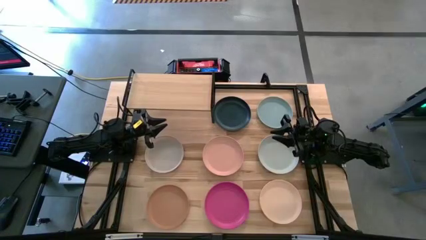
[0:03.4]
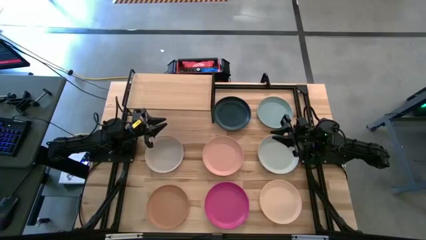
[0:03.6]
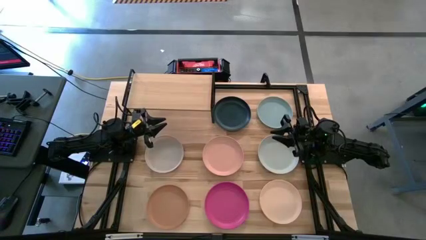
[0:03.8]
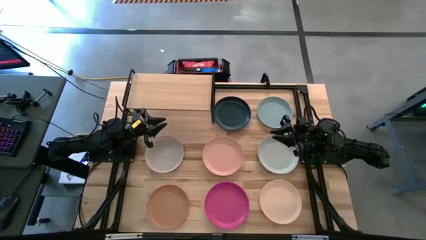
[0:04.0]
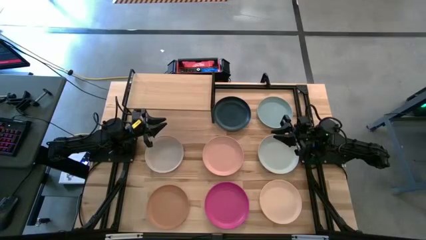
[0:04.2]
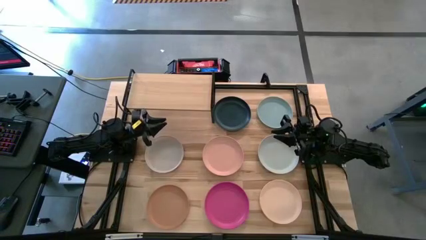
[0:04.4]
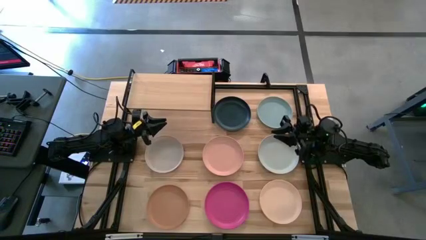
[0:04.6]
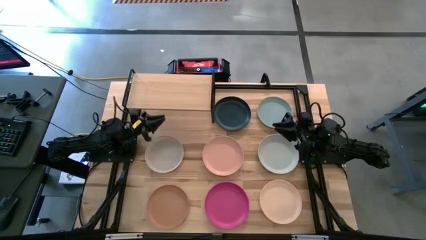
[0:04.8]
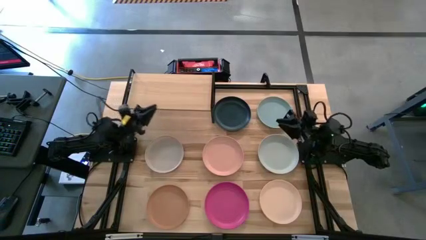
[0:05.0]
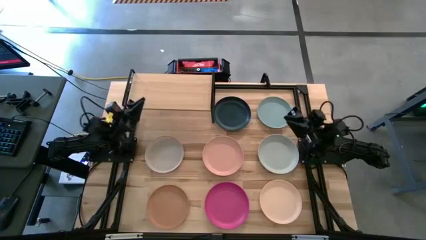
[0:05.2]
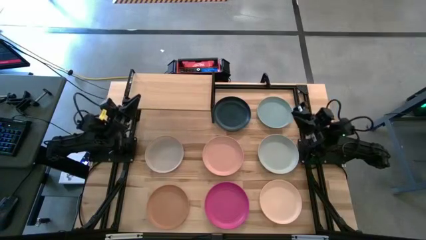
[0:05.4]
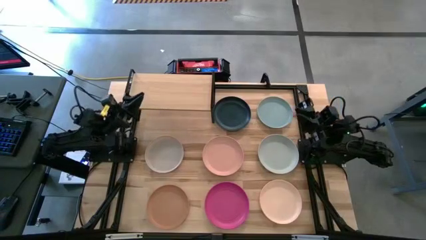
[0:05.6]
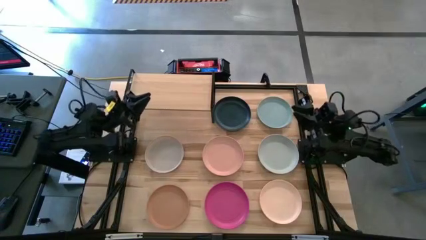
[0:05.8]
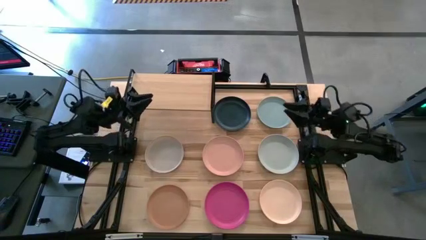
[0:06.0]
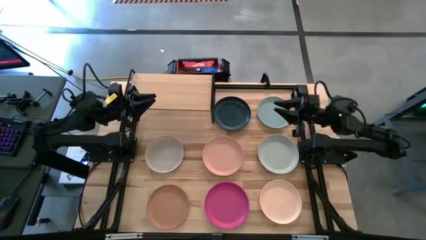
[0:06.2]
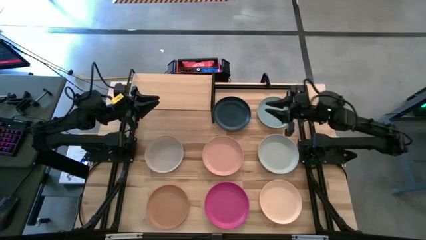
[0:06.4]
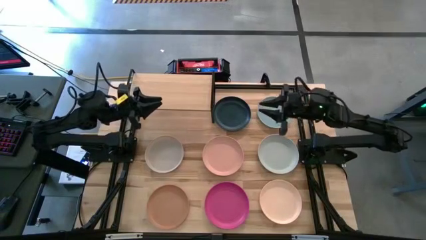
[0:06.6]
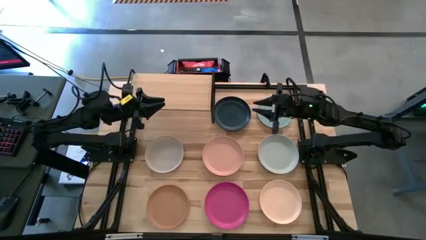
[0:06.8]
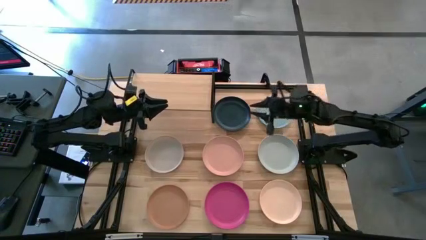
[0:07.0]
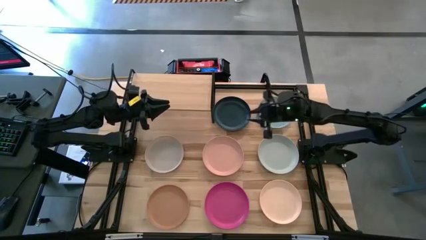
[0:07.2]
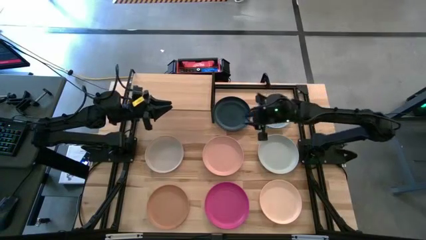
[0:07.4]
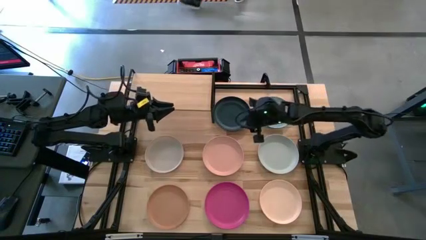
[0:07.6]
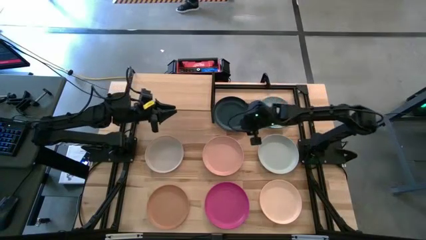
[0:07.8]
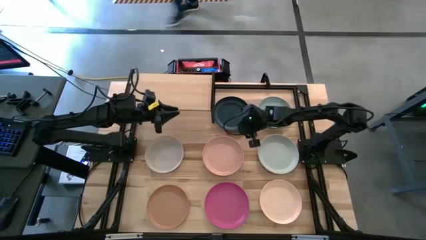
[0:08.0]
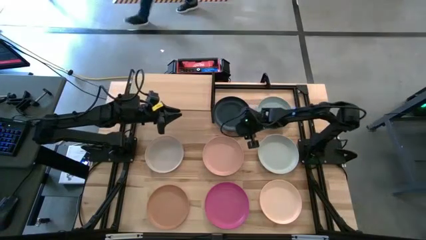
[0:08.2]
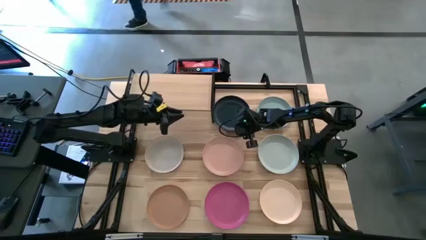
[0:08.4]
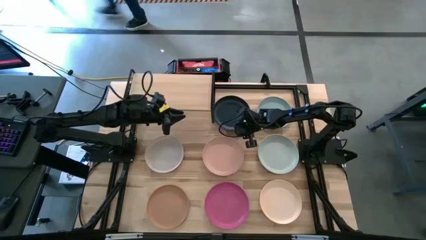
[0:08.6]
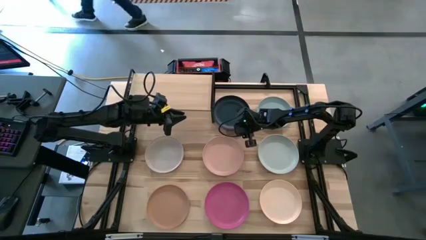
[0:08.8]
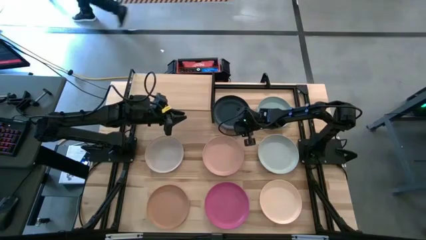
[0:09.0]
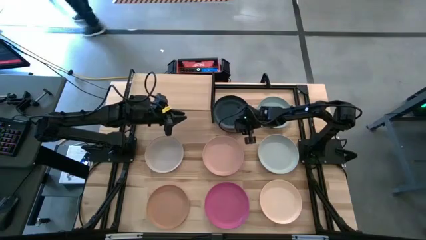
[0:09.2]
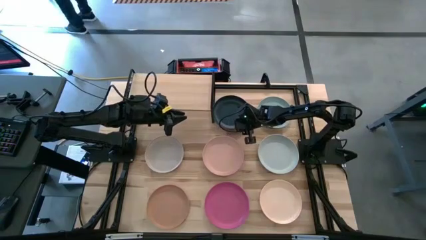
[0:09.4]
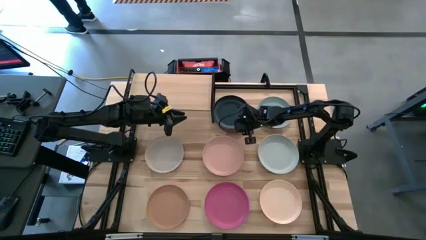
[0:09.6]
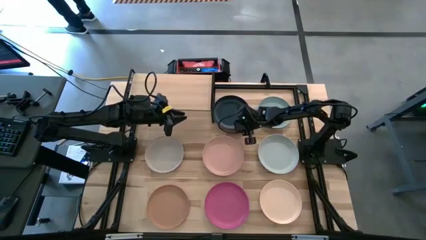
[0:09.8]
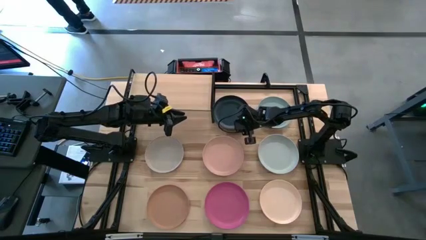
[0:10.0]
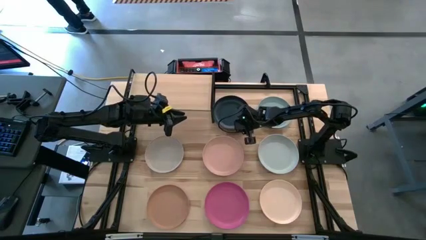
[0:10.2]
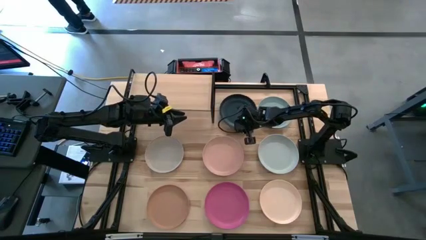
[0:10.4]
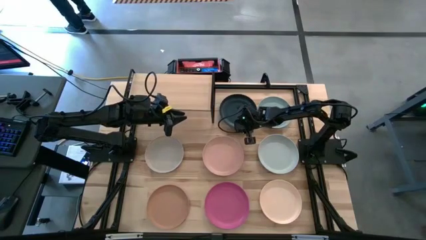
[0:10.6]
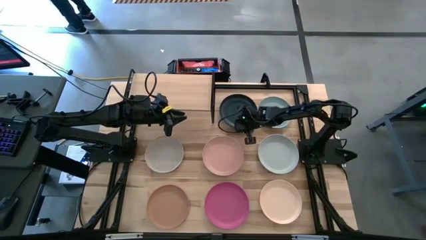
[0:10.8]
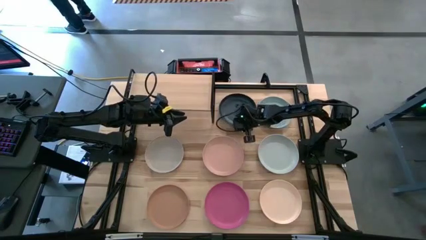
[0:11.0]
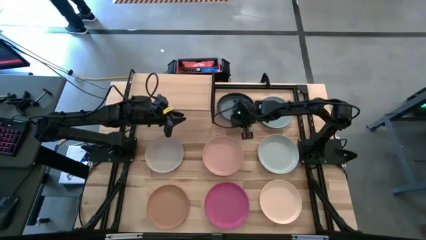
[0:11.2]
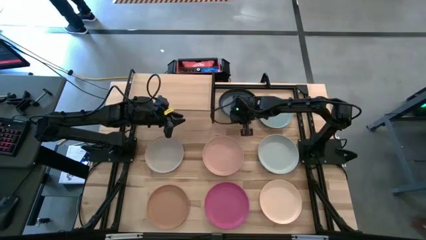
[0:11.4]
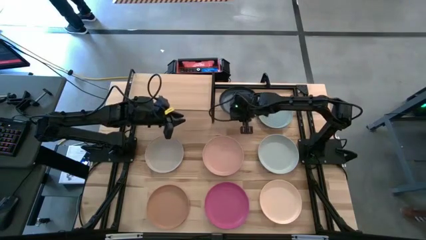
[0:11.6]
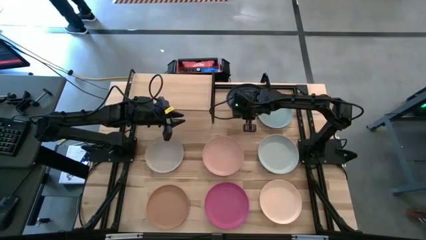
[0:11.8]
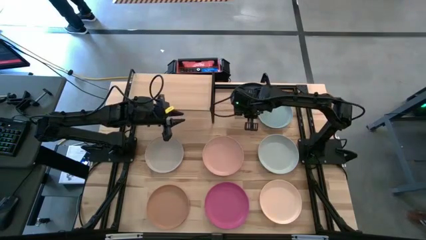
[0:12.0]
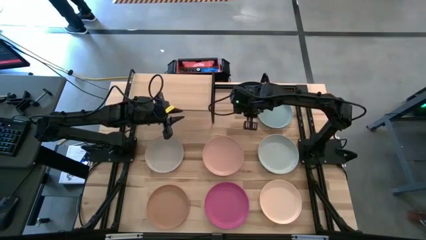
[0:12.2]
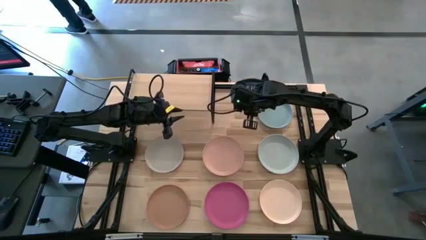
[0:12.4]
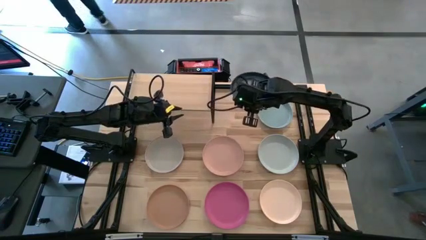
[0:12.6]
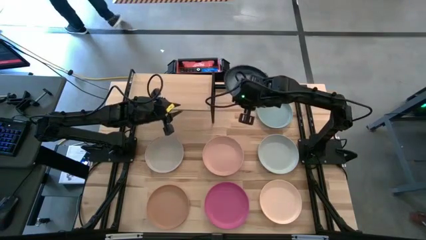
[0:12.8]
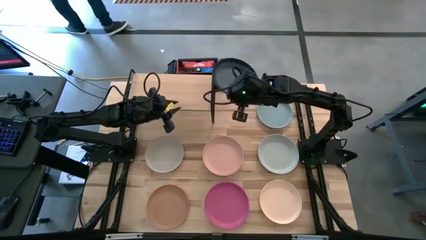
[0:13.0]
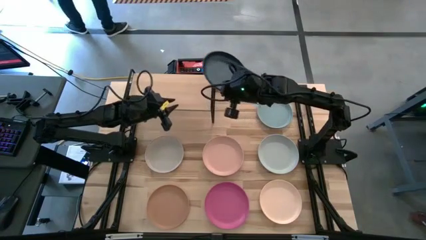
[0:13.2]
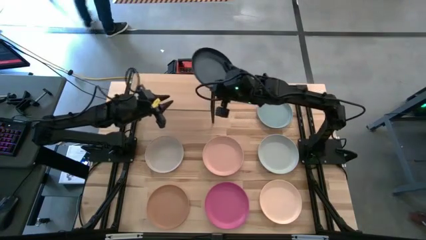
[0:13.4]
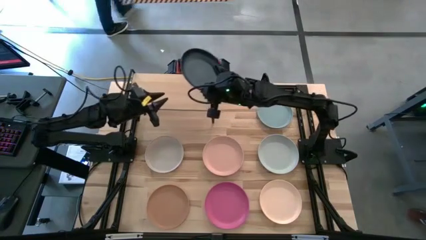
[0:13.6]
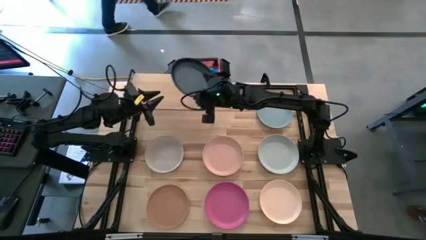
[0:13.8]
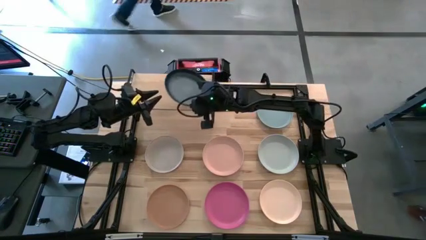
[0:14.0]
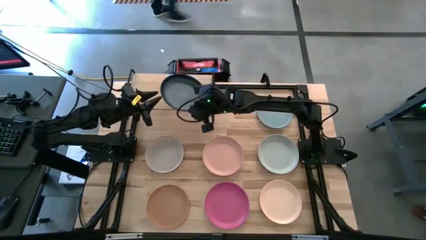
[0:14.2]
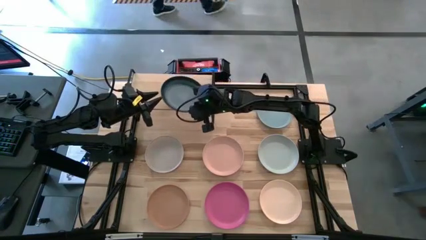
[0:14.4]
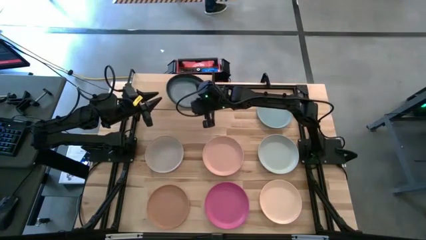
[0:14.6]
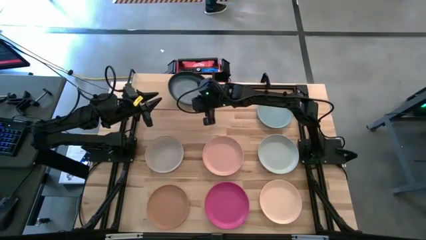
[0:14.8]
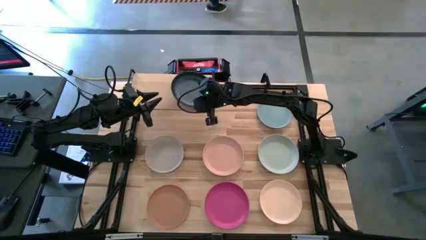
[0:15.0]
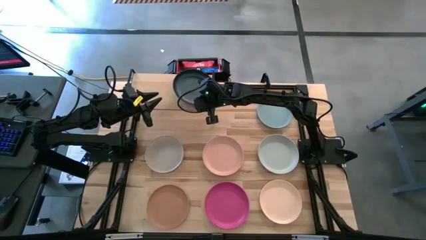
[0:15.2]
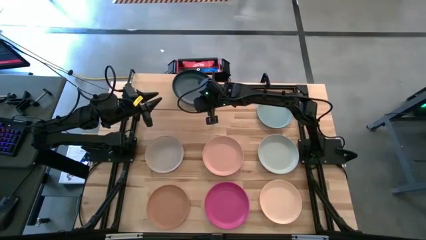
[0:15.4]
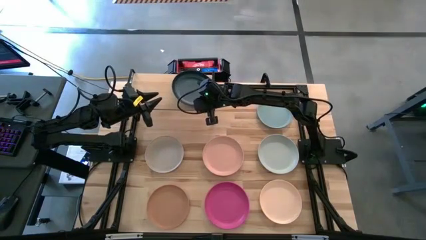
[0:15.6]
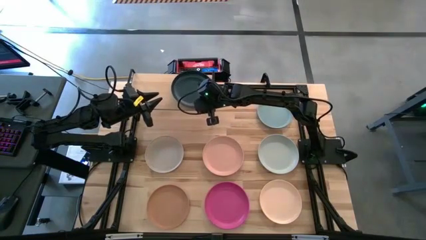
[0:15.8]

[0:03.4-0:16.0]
Task: Place and stack plates onto a shelf
Put the black plate on the shelf
